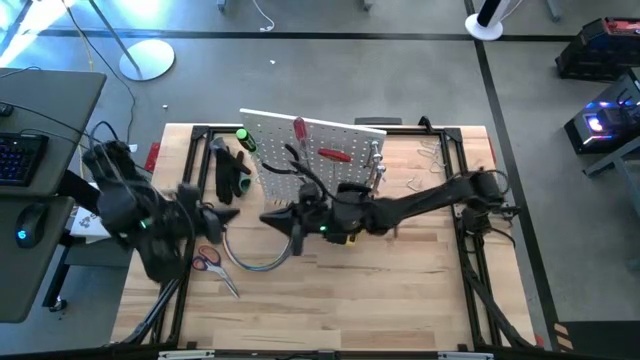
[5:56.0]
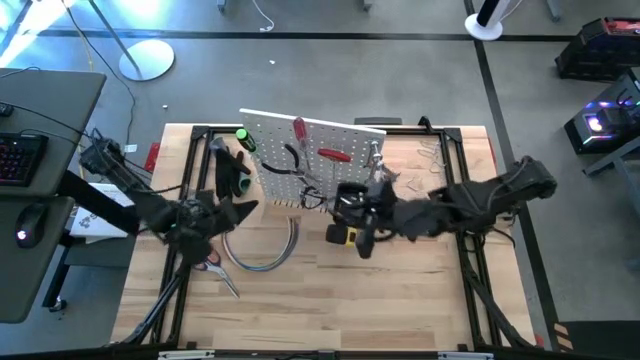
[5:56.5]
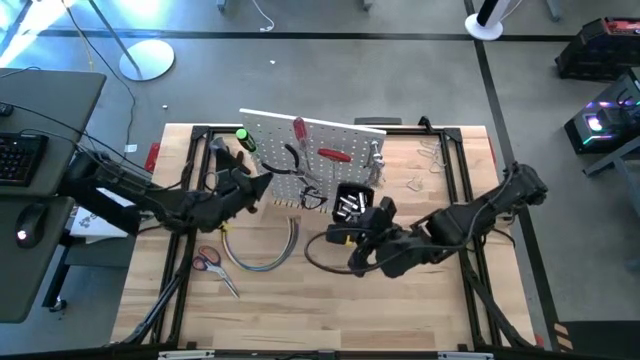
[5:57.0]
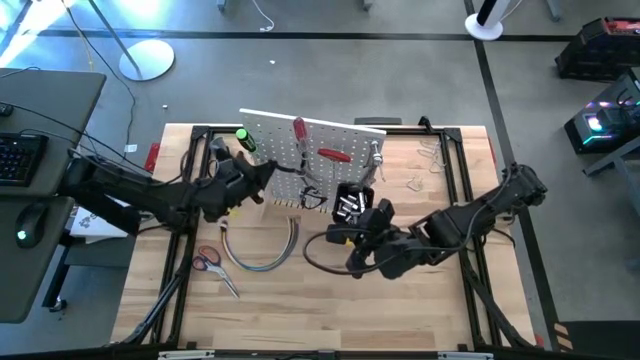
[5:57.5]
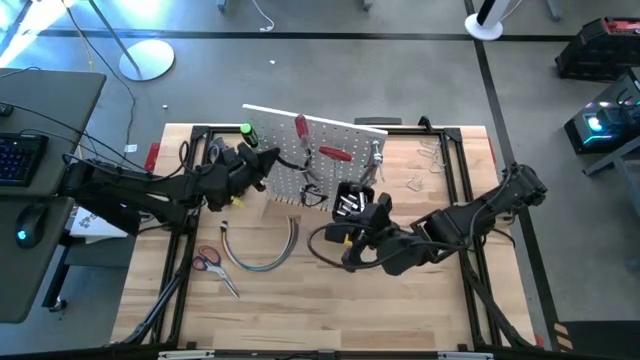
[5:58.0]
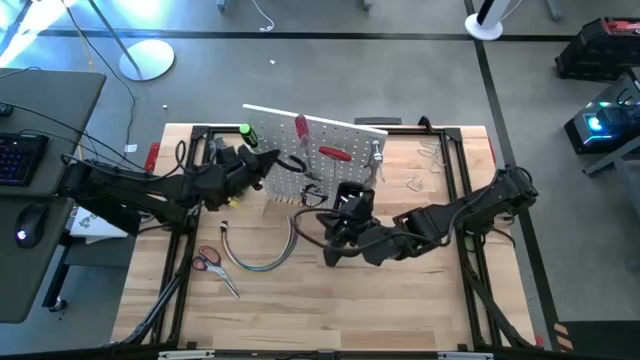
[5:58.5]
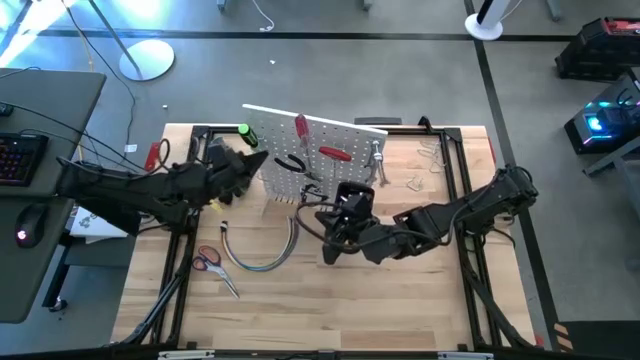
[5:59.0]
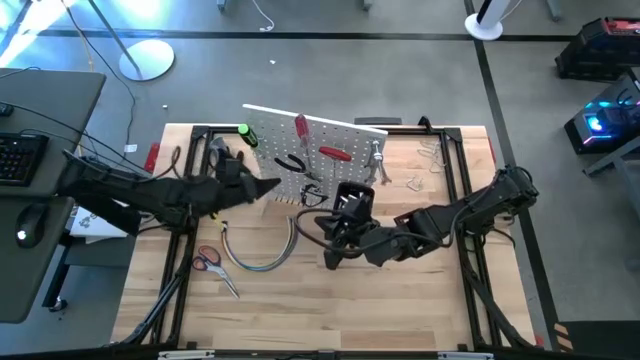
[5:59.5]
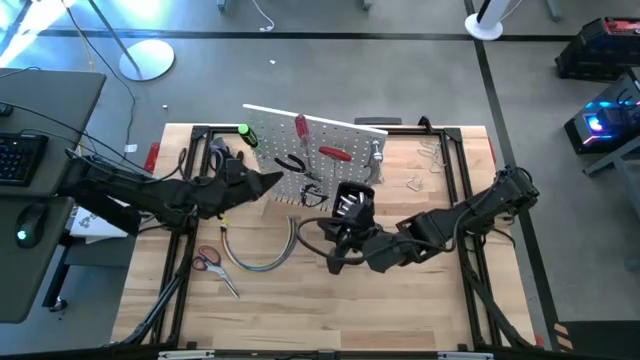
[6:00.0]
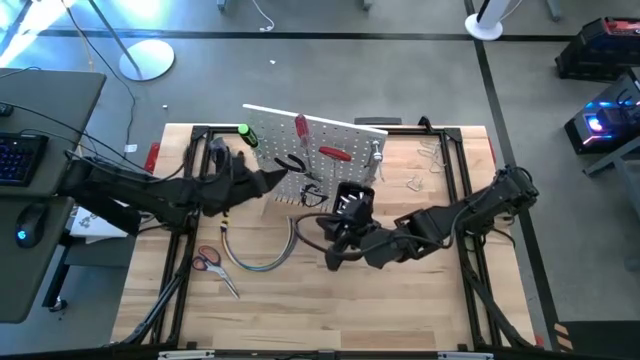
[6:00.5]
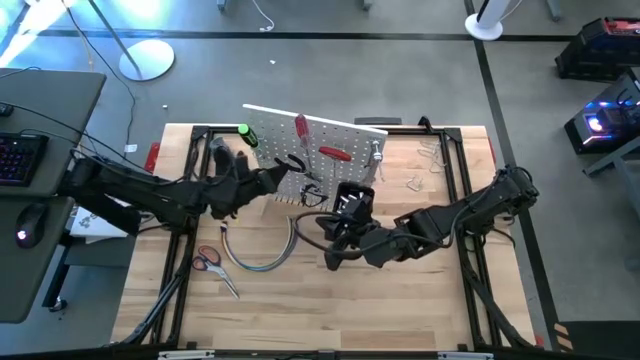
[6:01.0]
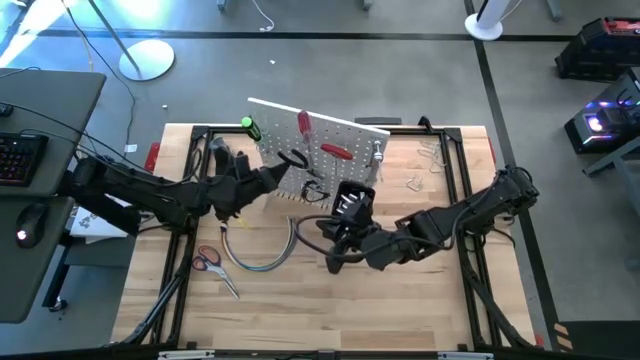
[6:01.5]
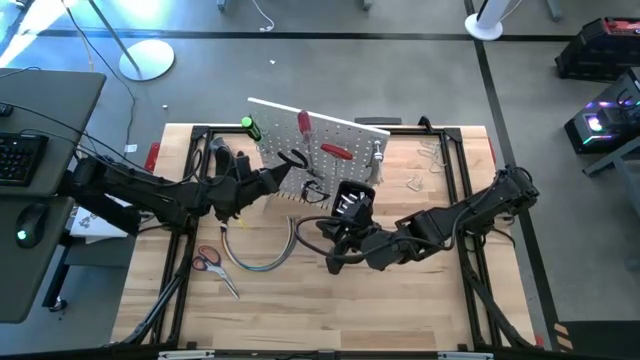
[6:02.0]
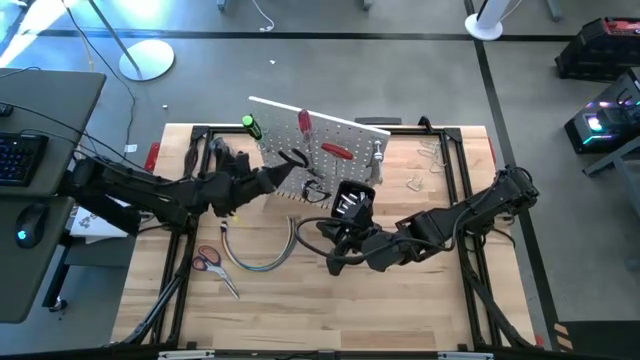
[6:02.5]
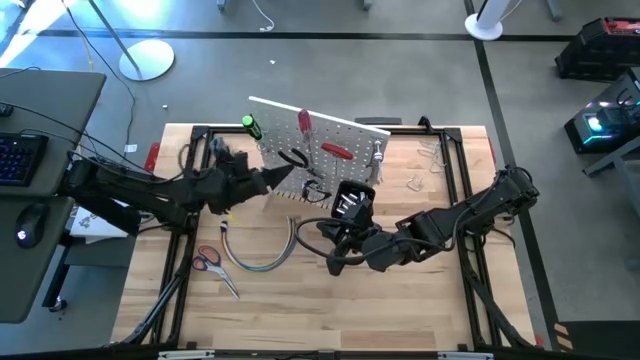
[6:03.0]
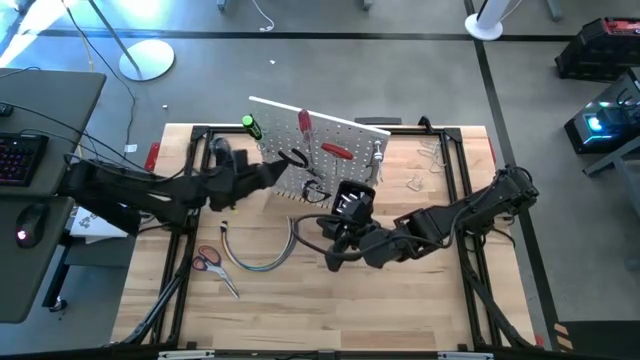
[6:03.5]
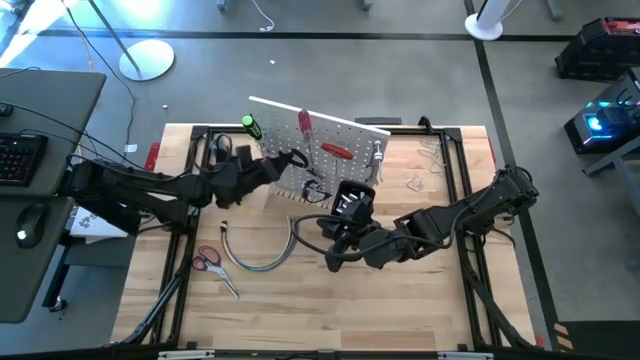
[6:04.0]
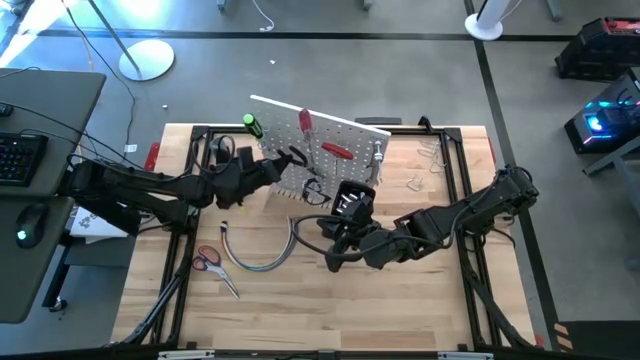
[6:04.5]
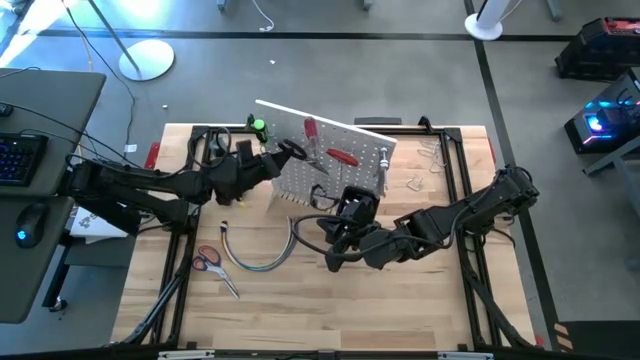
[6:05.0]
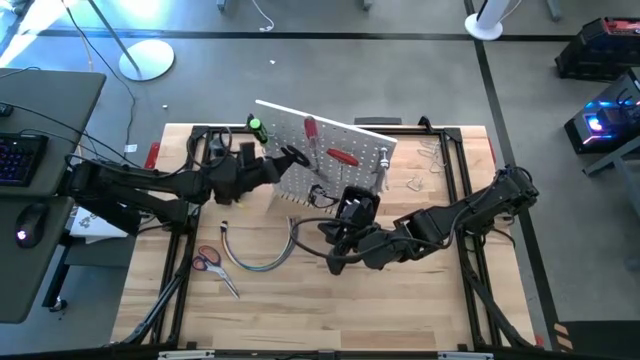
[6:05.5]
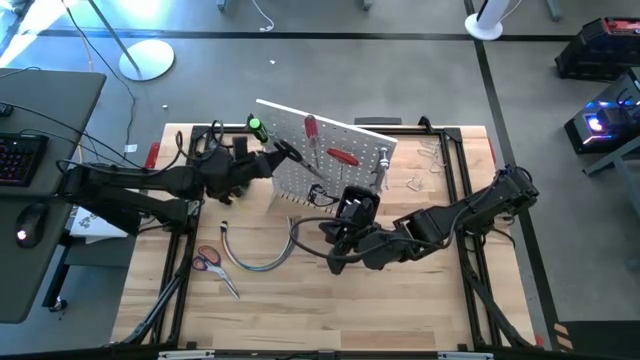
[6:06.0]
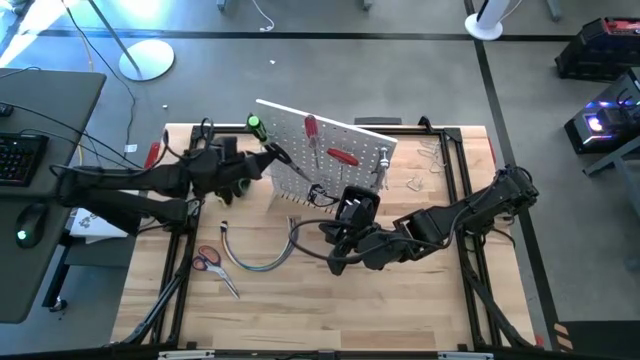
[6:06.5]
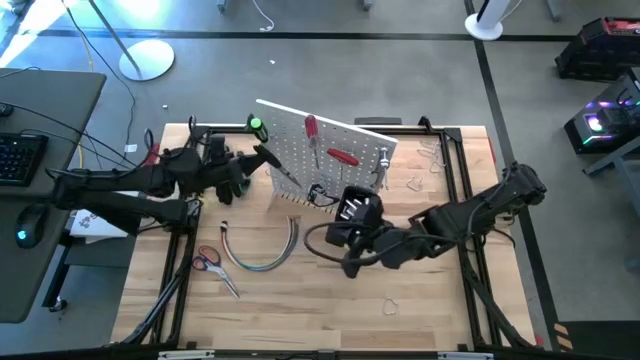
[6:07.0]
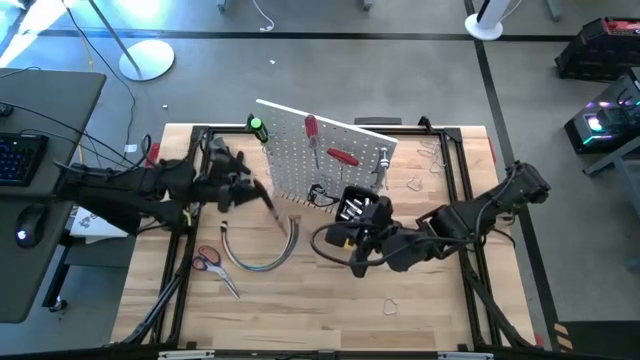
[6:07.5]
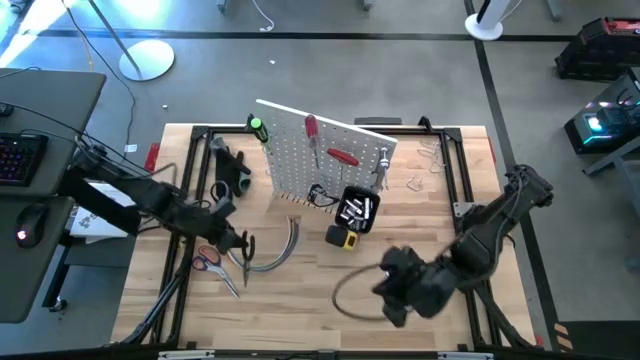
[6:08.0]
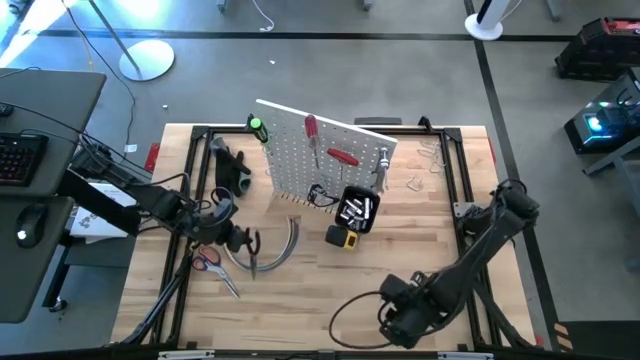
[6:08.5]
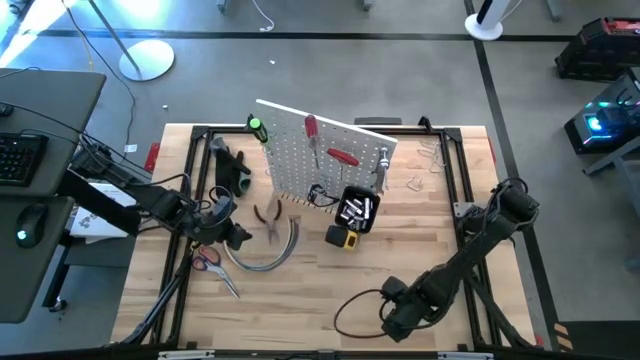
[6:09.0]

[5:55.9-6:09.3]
Task: Hang tools onto peg board
Remove the plier from the peg board

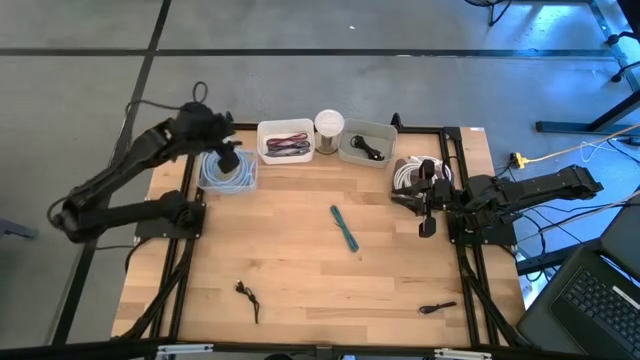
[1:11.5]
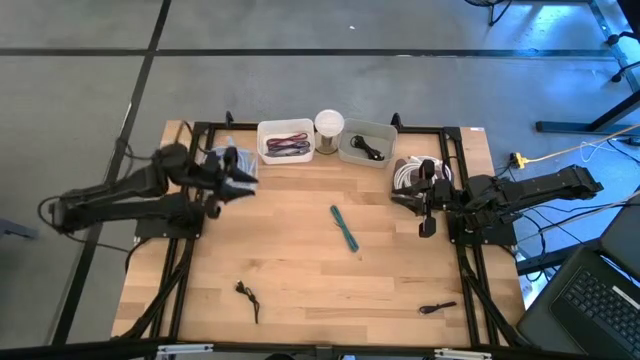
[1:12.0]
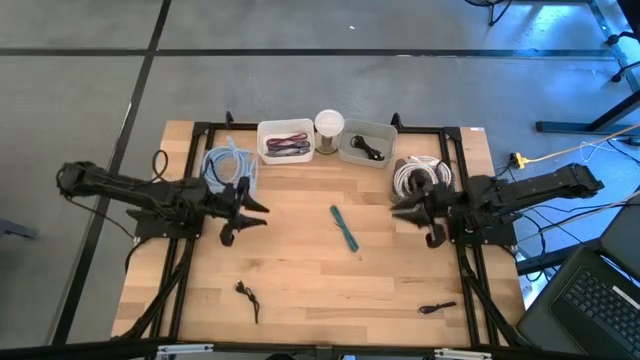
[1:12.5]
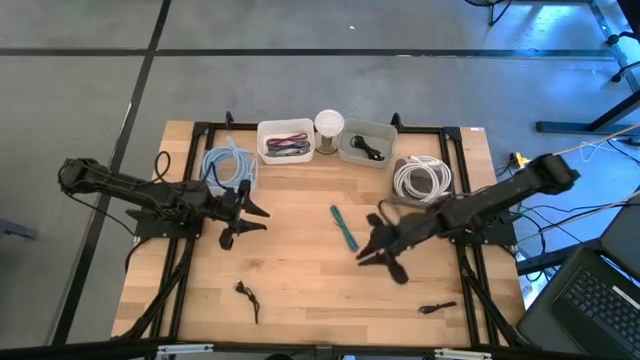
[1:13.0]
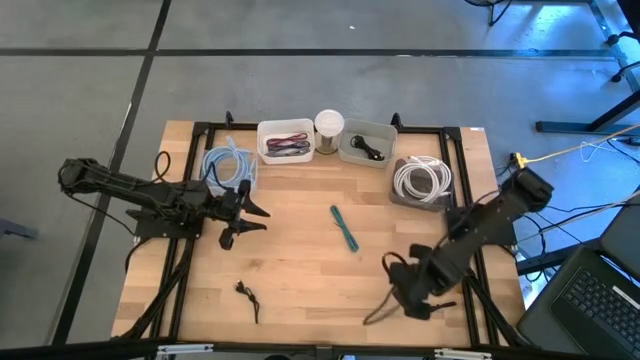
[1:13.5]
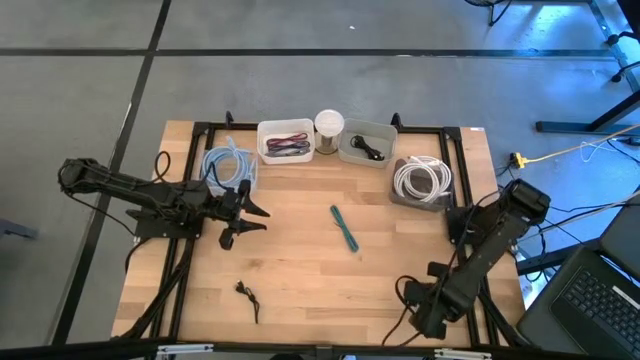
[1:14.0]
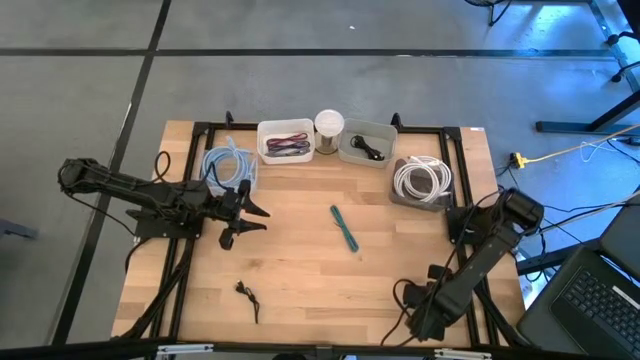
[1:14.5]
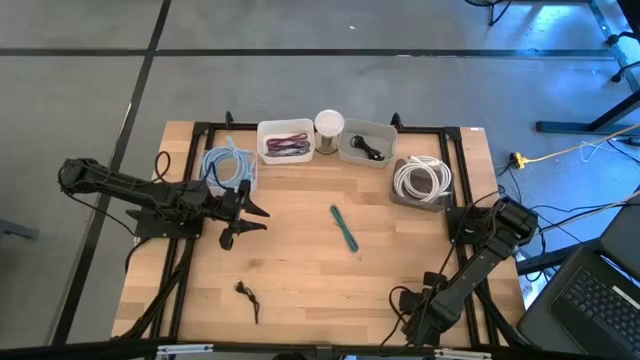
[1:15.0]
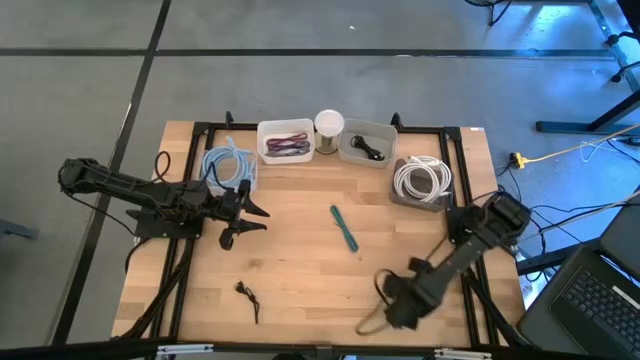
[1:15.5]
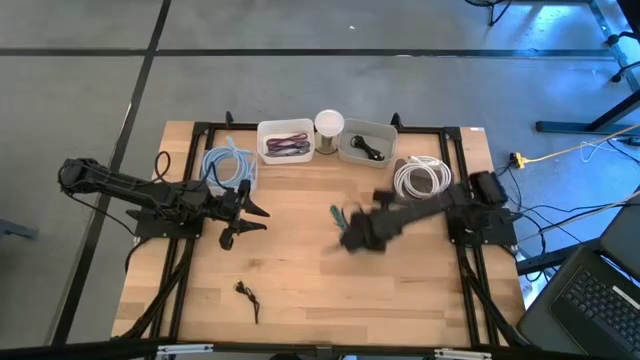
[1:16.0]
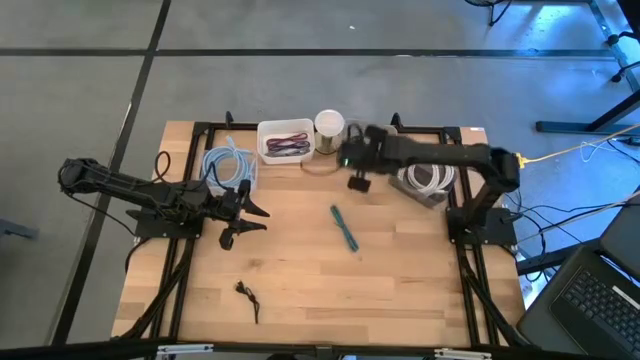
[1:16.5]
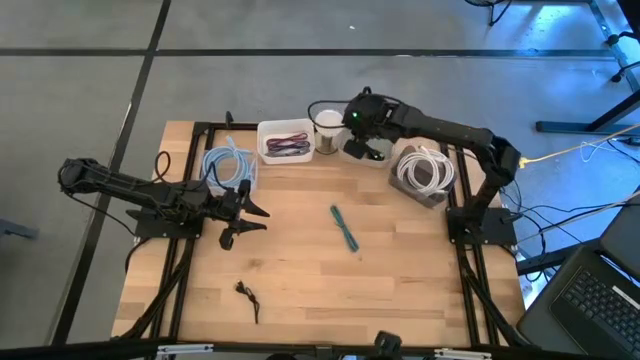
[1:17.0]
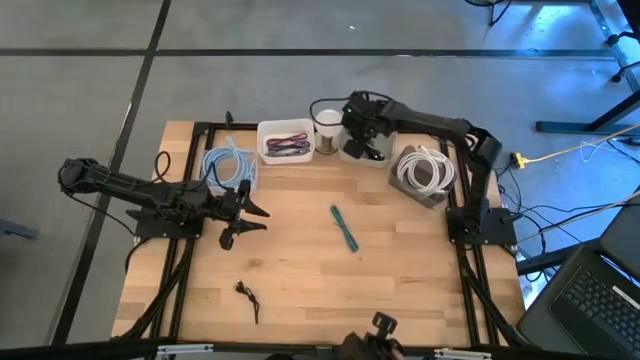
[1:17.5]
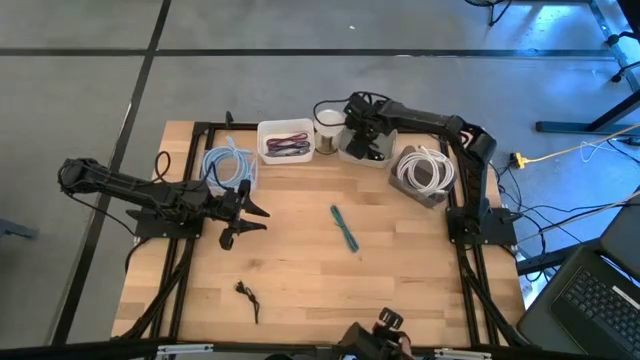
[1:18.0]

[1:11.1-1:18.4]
Task: Pick & Place USB Port
Put the black USB cable into the gray bin

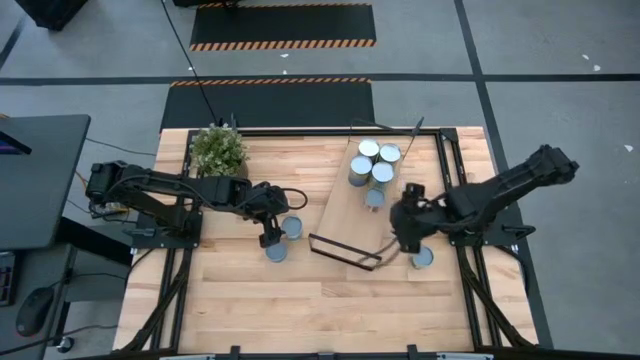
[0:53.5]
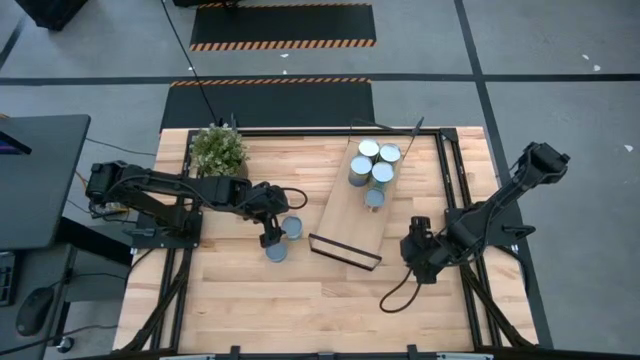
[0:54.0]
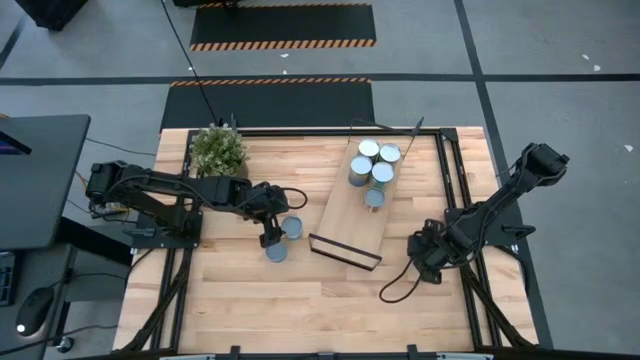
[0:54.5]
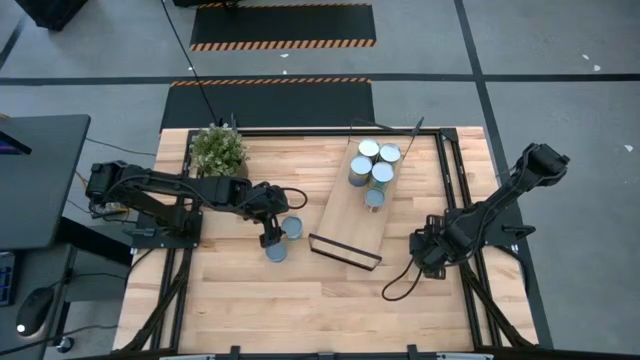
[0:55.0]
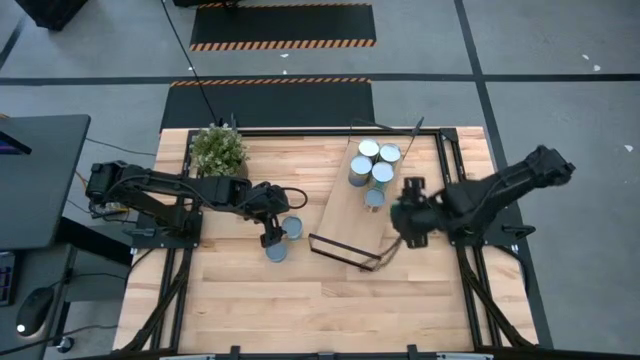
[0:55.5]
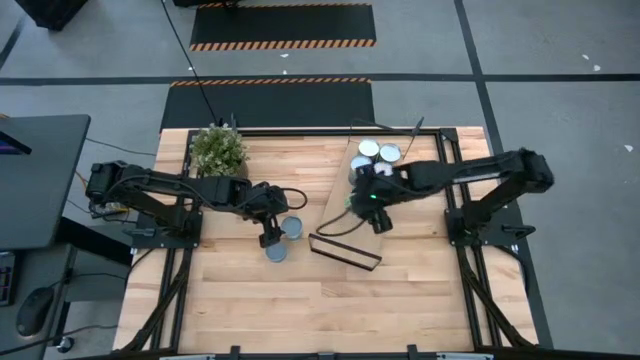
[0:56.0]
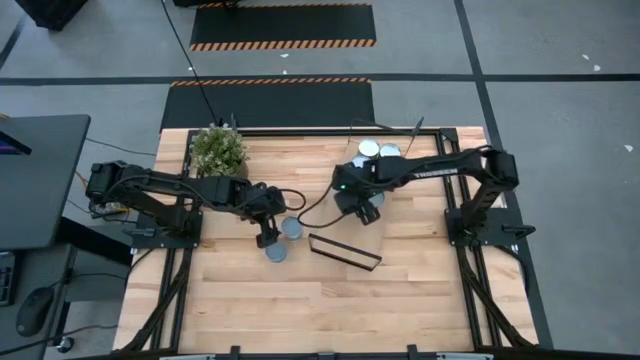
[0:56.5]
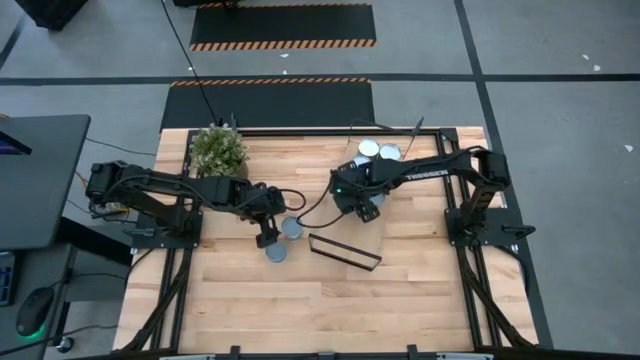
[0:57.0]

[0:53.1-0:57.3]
Task: Pick and place cans onto a shelf
Put the canned green peas on the shelf
